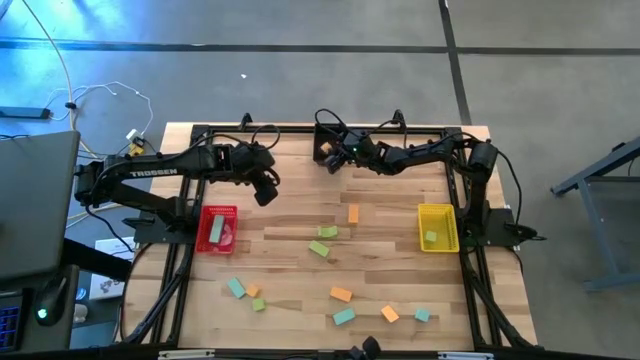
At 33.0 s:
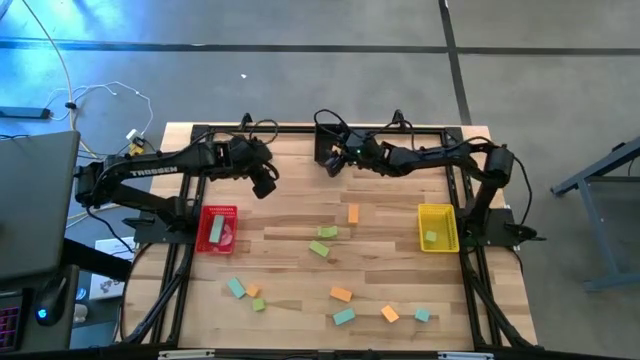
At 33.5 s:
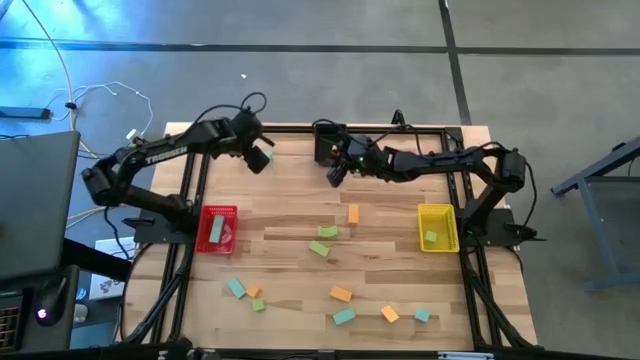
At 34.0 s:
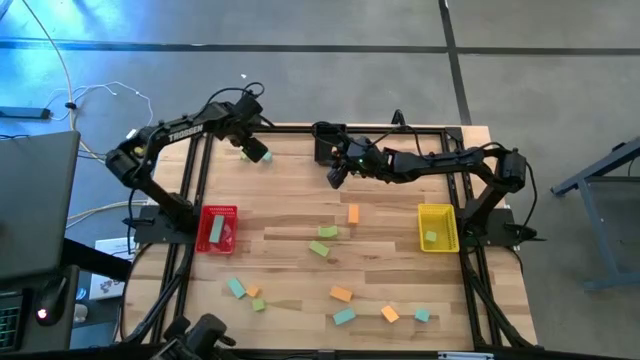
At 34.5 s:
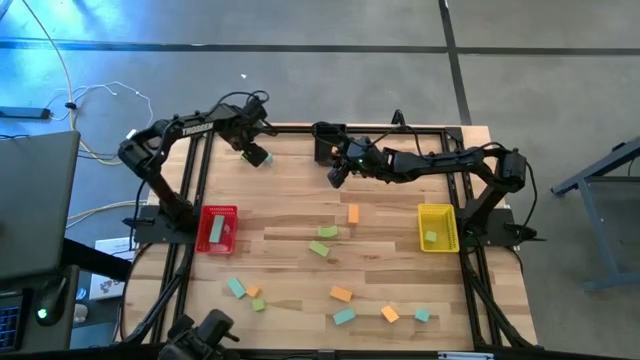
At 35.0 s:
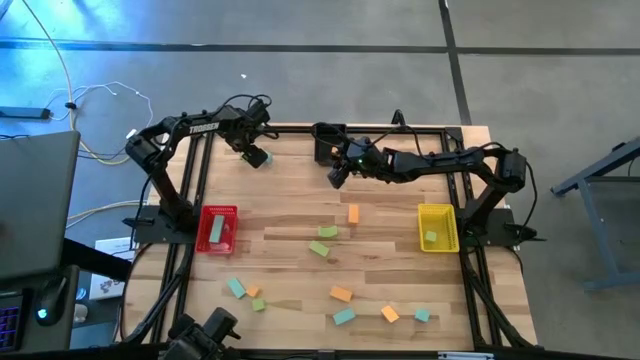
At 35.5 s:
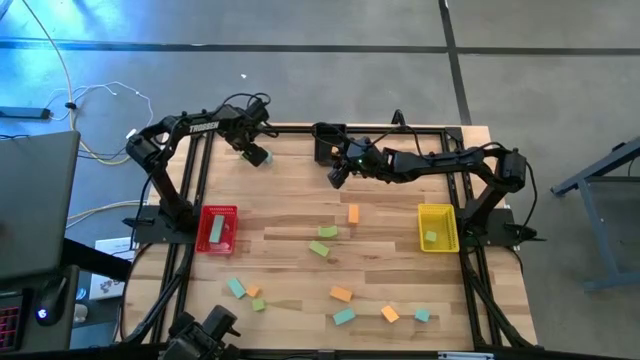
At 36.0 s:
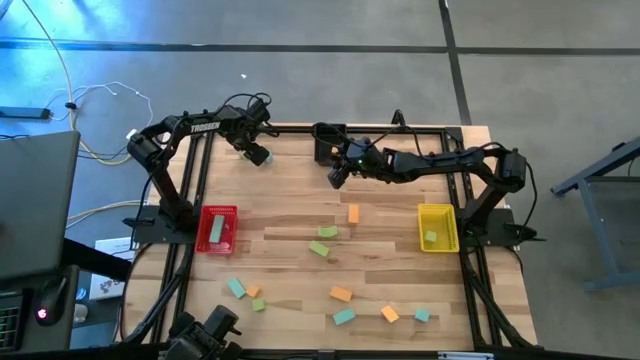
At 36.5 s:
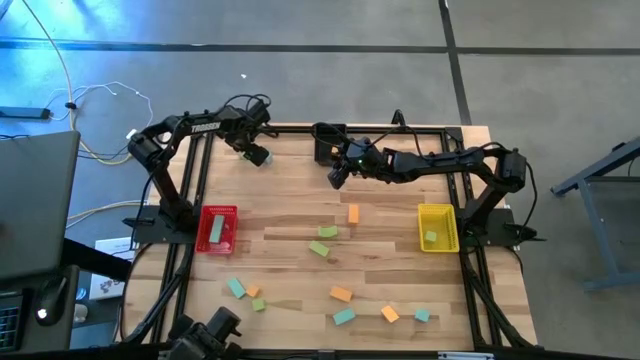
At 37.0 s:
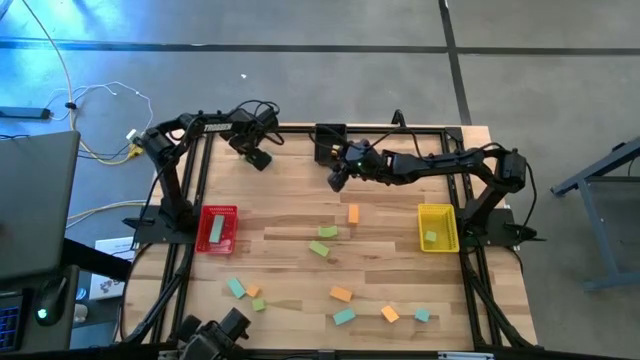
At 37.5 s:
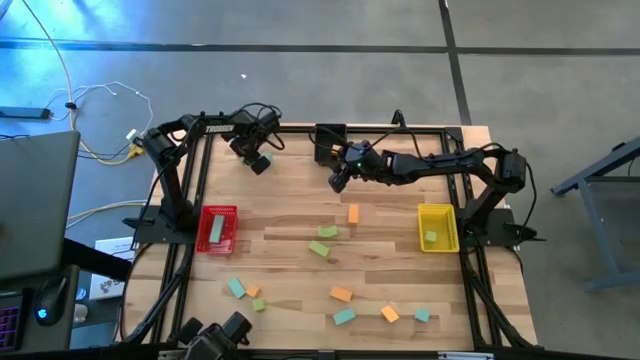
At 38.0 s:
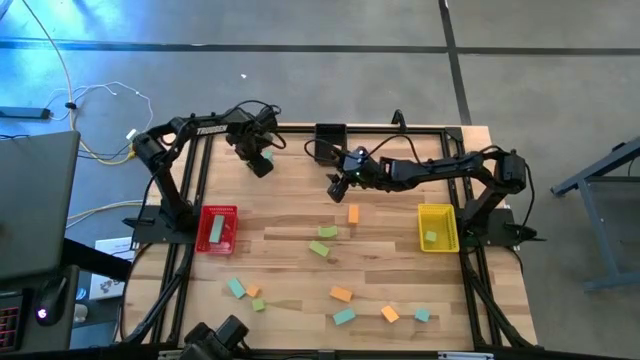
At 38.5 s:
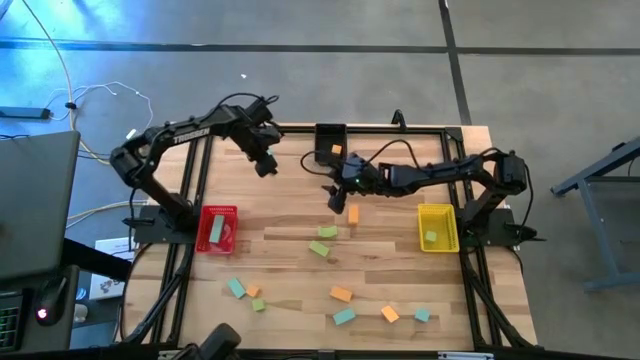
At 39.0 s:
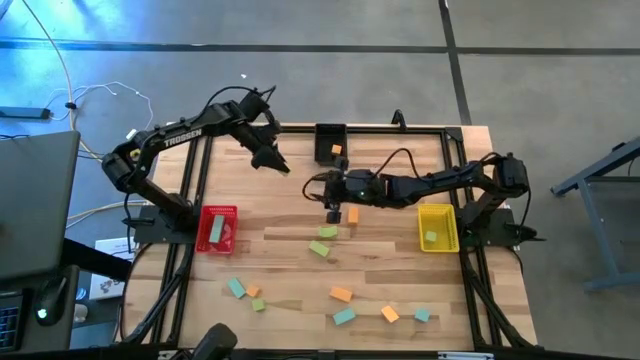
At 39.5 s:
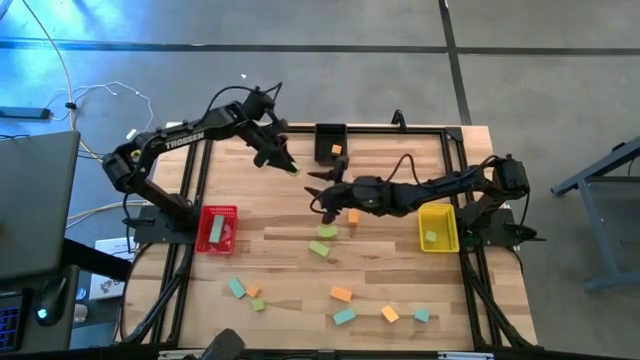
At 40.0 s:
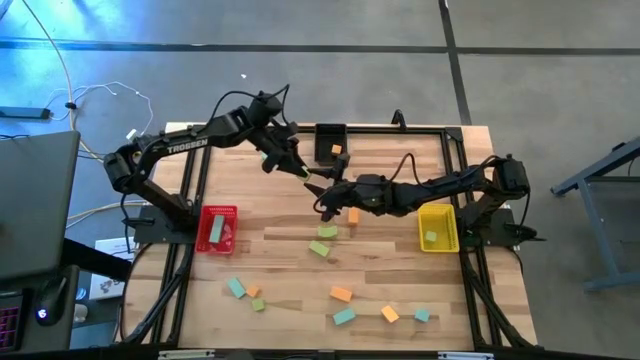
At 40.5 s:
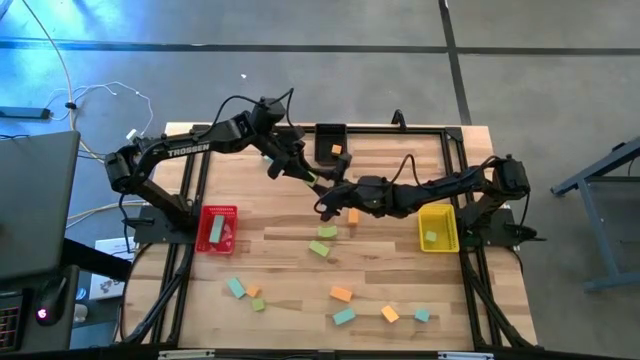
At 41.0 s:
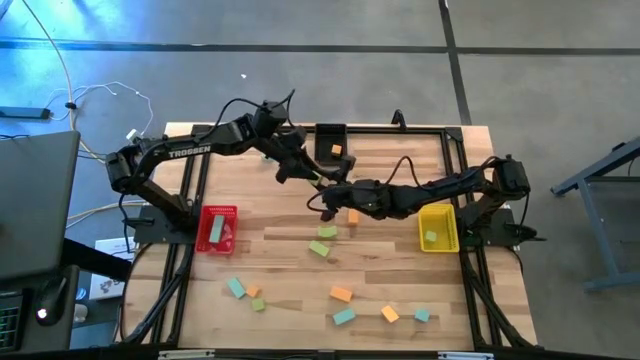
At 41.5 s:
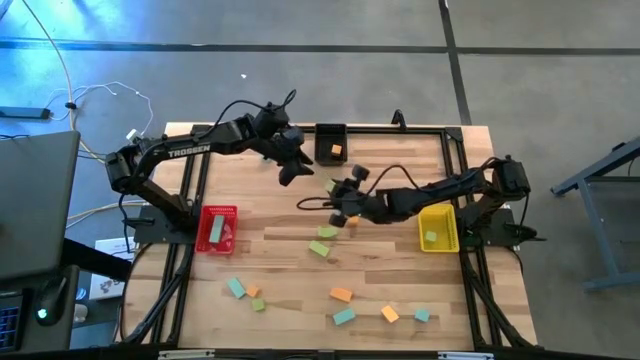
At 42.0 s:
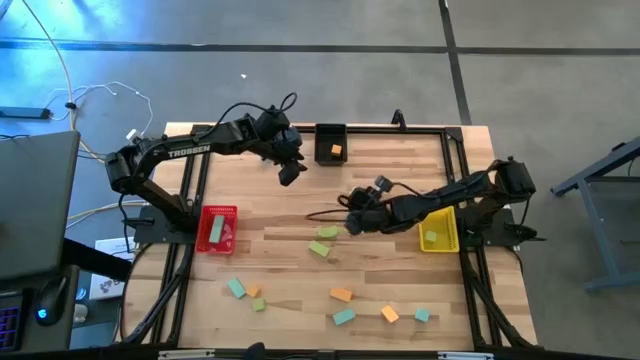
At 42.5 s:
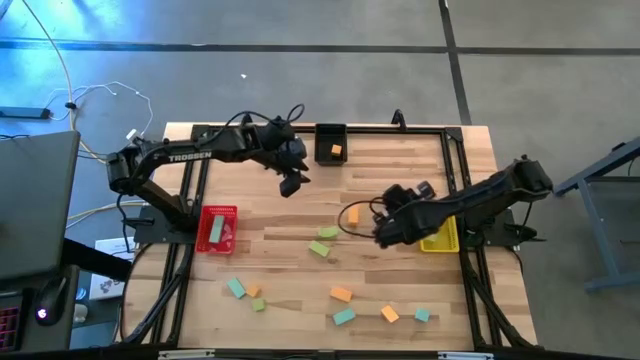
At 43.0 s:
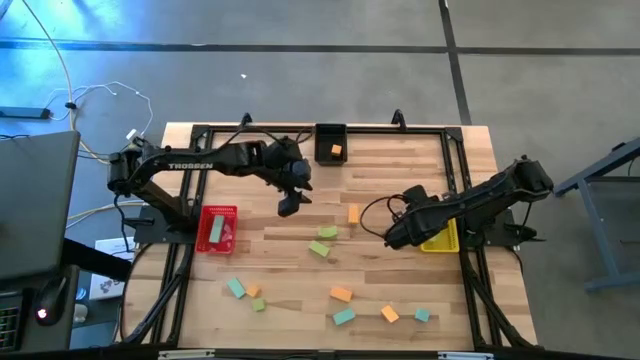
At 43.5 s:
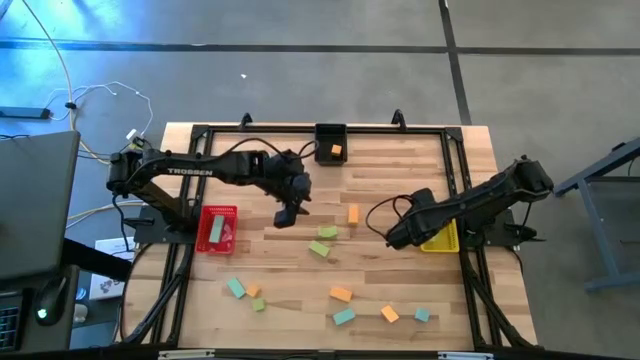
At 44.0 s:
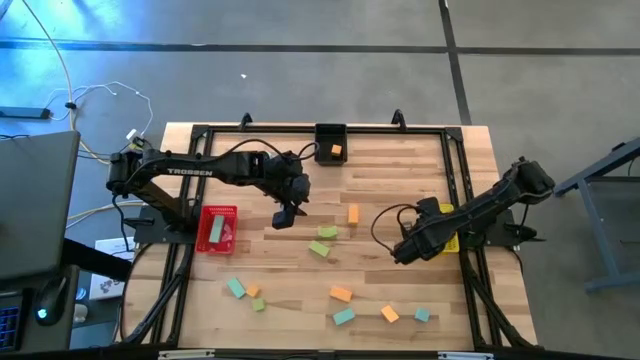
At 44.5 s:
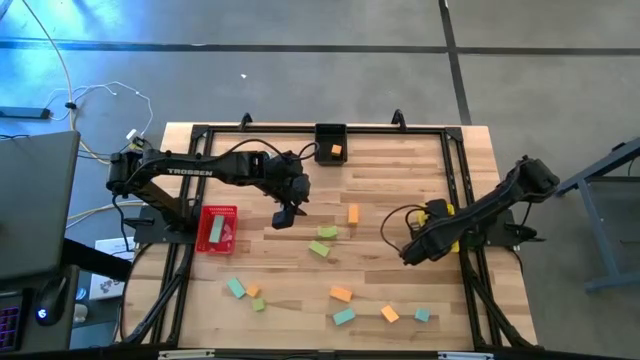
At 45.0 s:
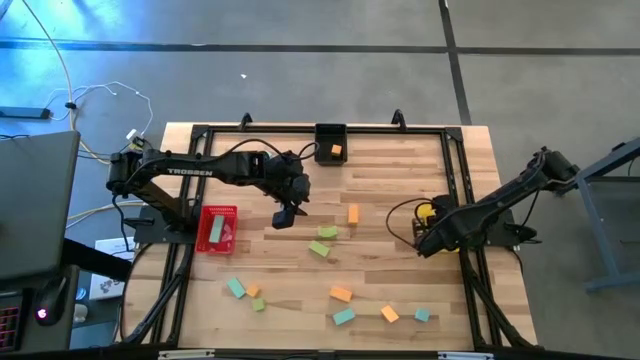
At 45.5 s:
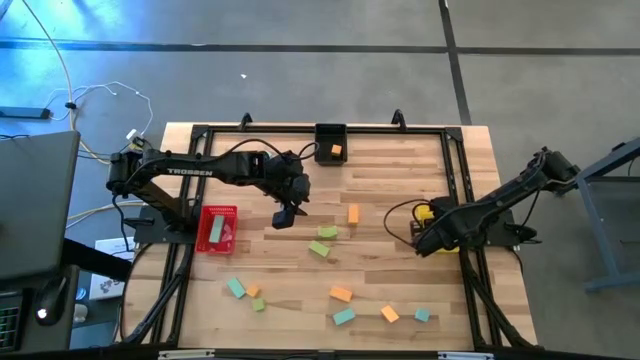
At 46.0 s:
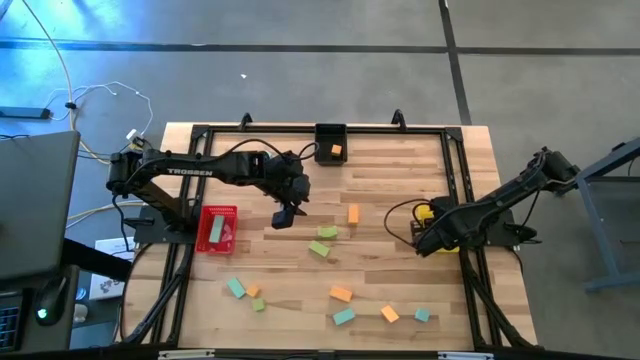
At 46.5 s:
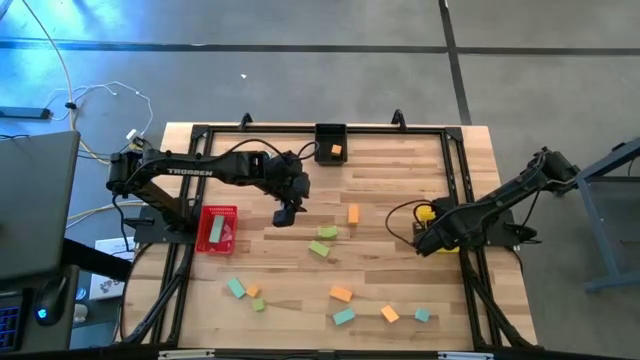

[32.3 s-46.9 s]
Task: Sort & place blocks by color
Put the green block into the yellow bin

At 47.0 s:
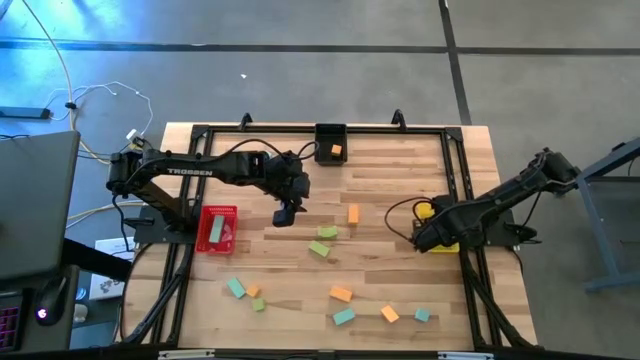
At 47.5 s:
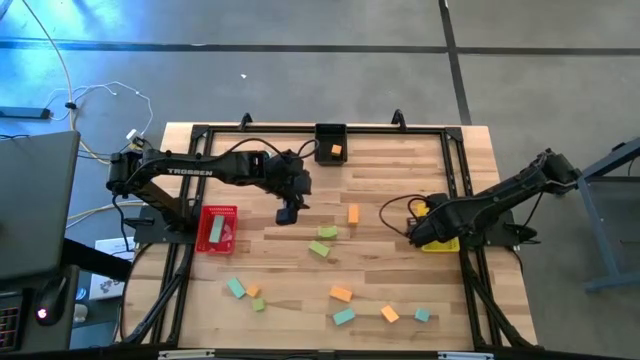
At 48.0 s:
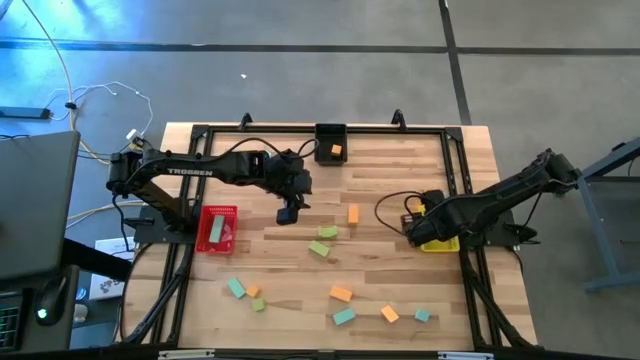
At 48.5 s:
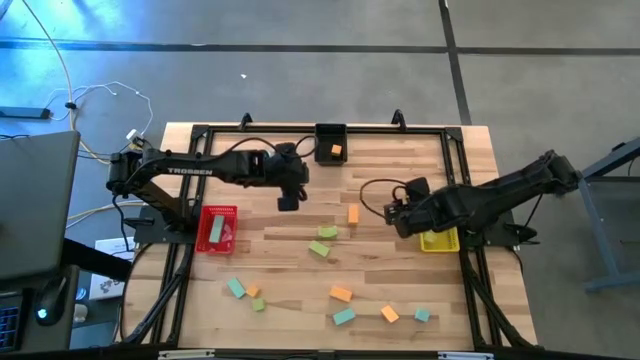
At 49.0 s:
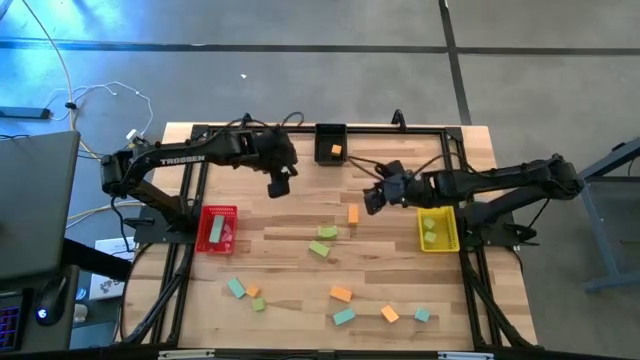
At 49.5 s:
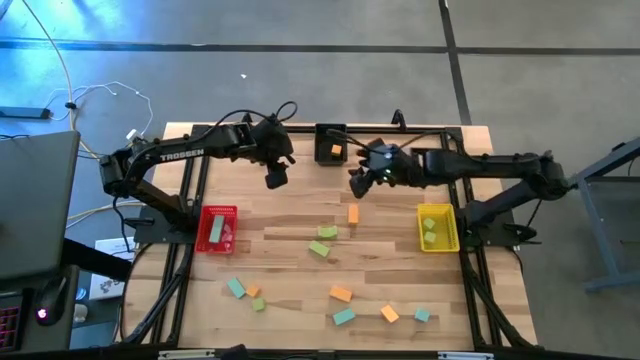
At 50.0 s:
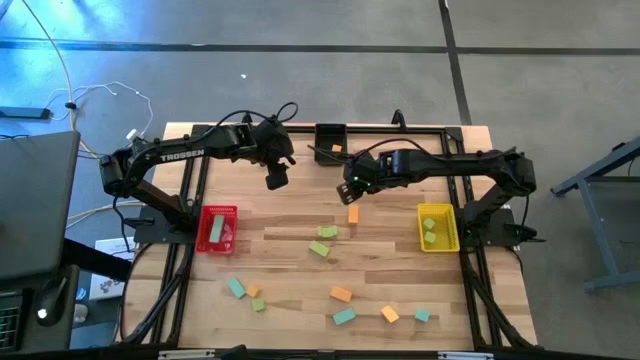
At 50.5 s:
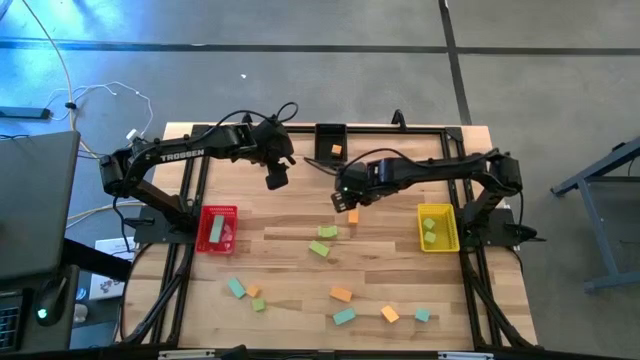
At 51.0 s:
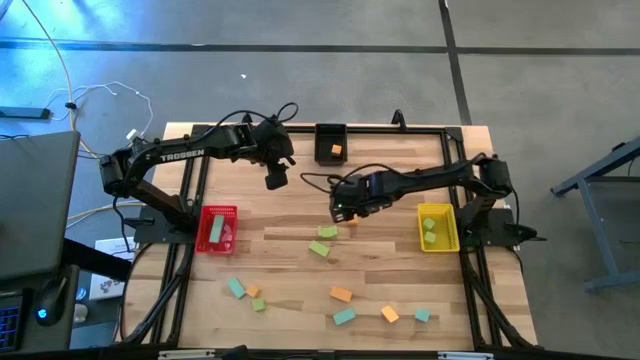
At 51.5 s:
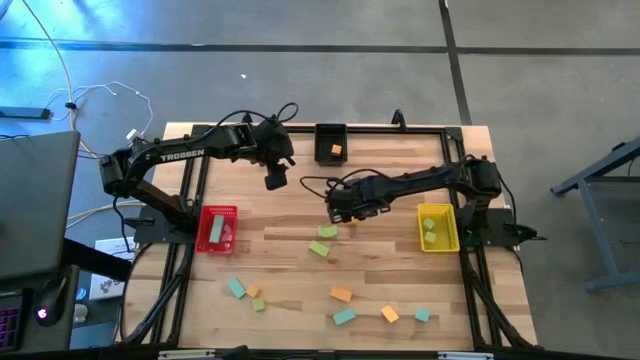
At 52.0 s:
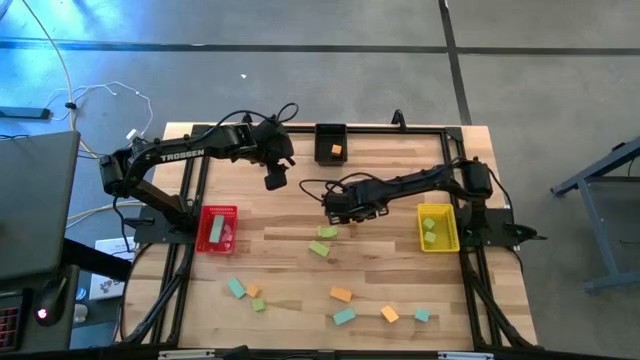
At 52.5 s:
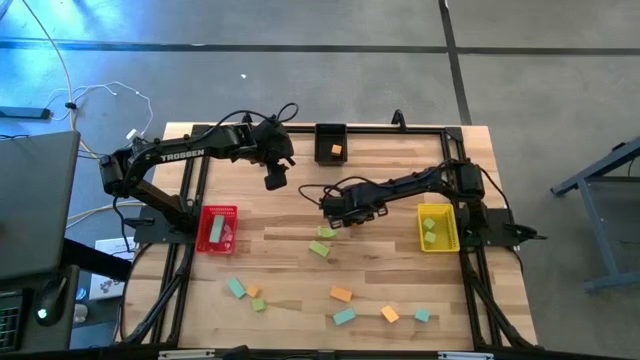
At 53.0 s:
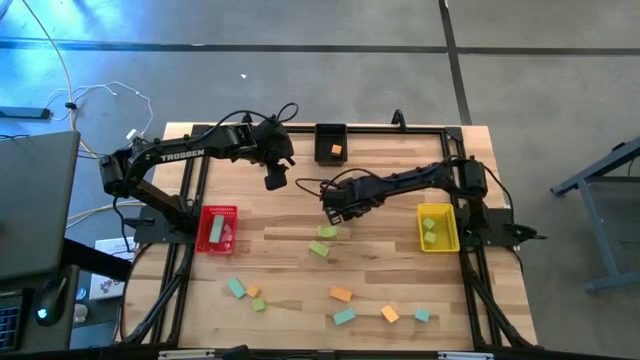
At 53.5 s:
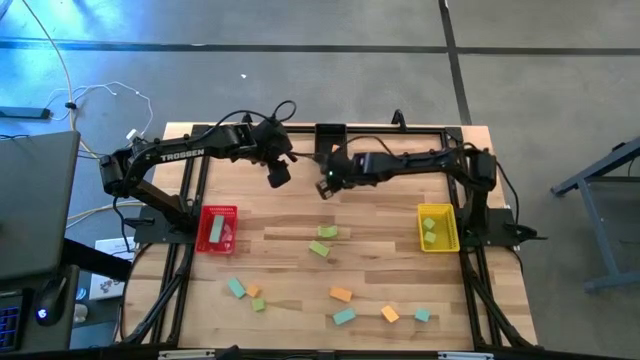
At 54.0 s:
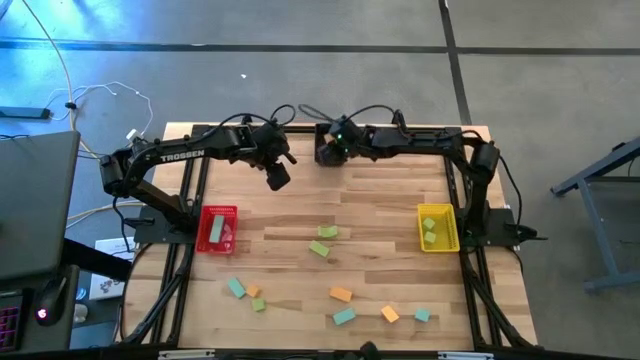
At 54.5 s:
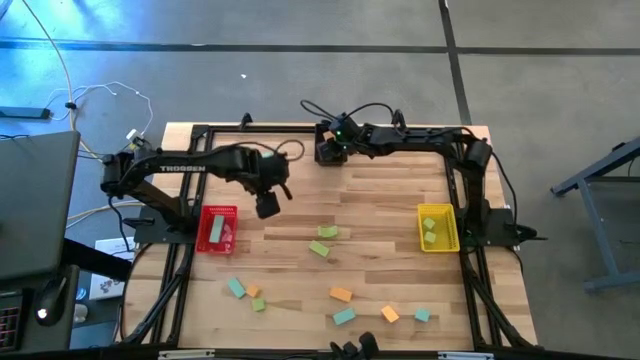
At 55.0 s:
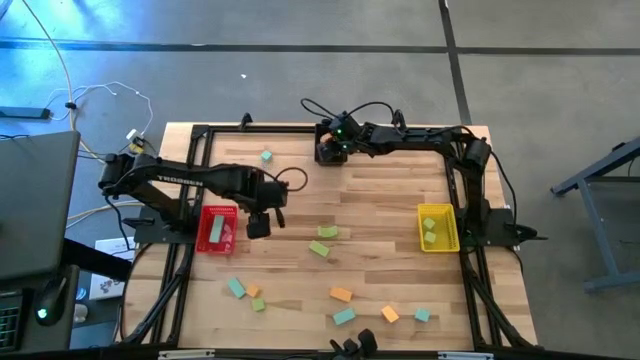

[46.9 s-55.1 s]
Put the orange block into the black bin
